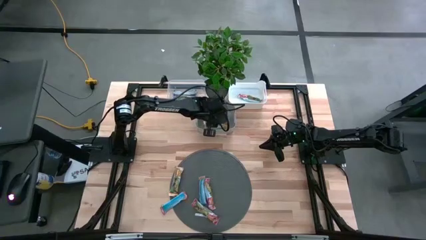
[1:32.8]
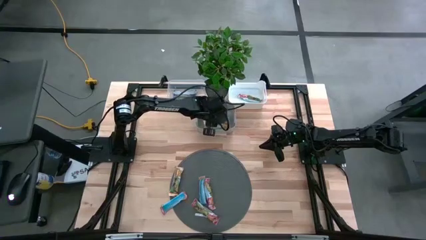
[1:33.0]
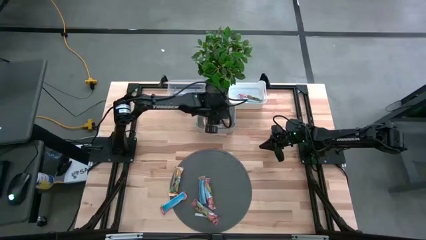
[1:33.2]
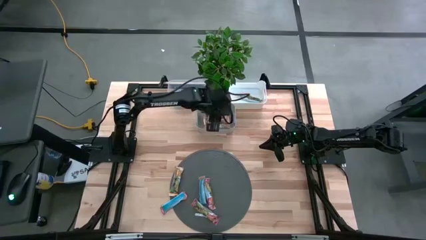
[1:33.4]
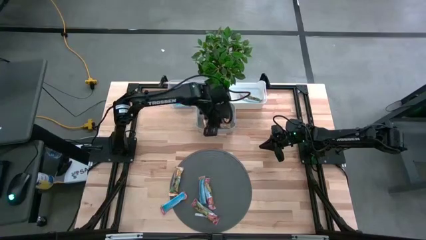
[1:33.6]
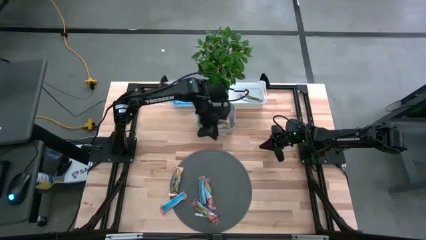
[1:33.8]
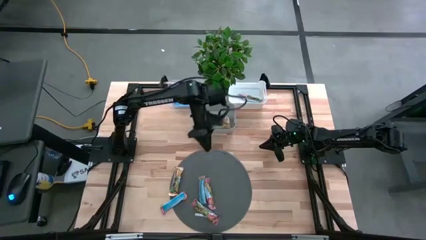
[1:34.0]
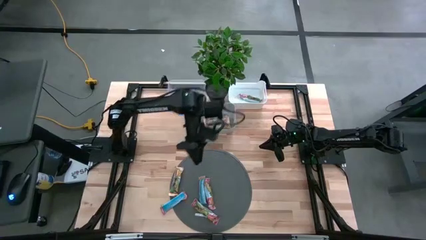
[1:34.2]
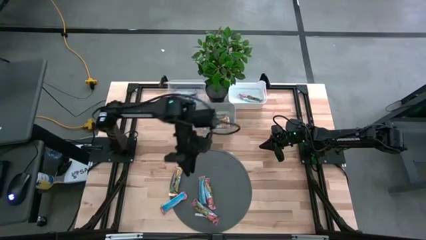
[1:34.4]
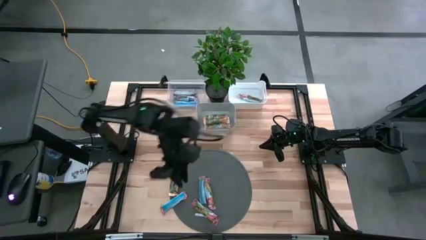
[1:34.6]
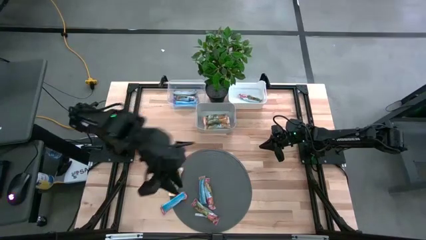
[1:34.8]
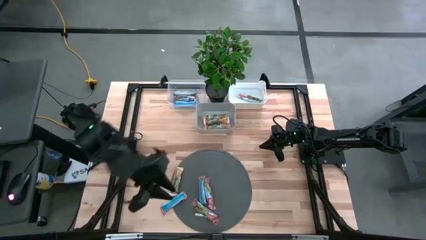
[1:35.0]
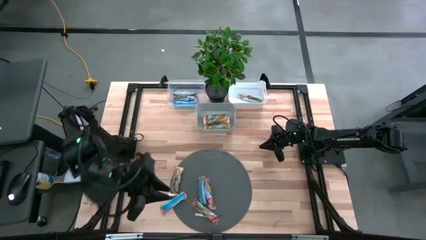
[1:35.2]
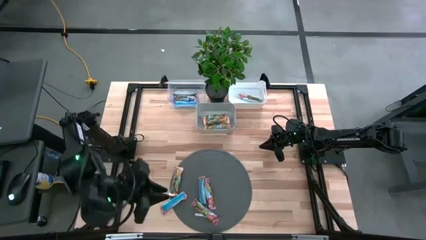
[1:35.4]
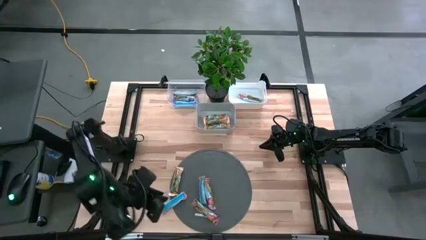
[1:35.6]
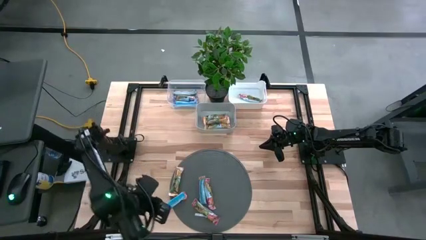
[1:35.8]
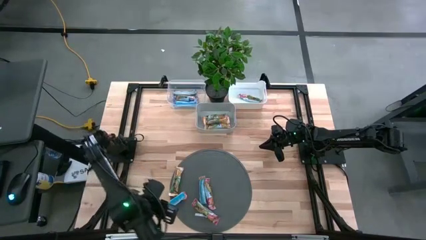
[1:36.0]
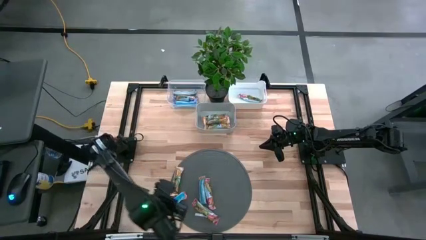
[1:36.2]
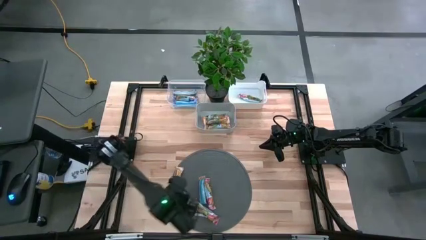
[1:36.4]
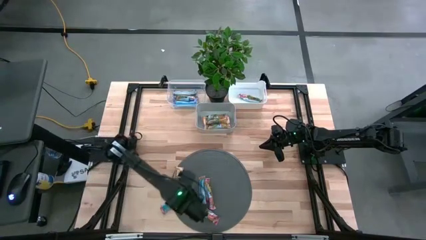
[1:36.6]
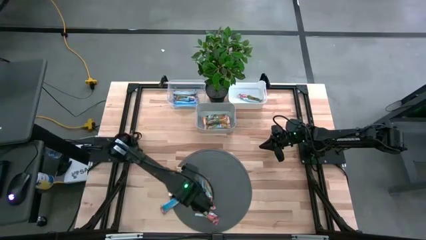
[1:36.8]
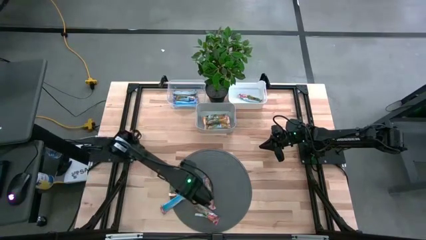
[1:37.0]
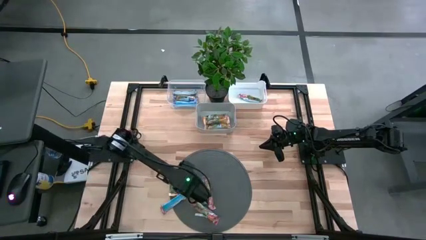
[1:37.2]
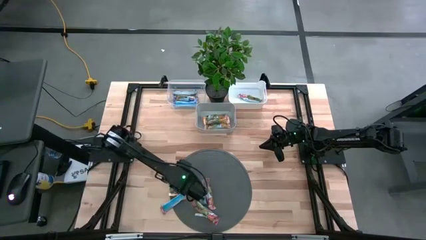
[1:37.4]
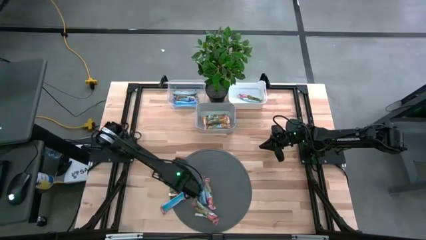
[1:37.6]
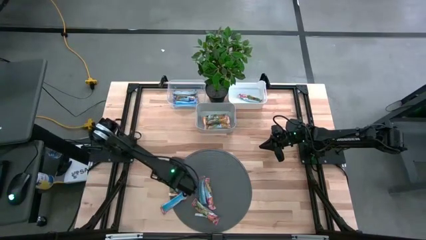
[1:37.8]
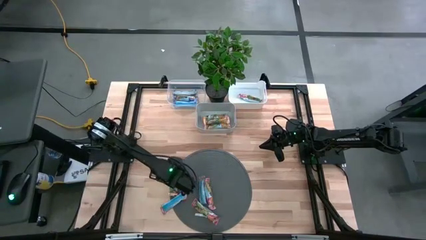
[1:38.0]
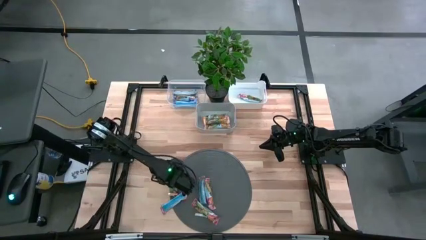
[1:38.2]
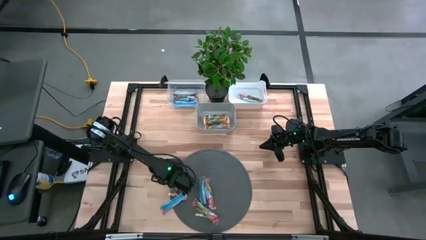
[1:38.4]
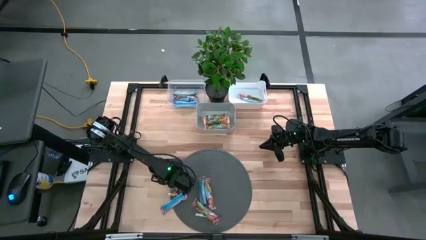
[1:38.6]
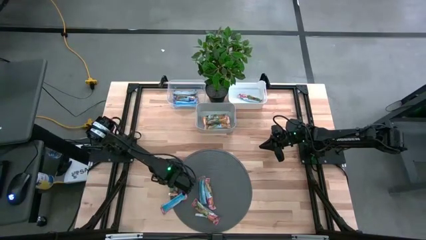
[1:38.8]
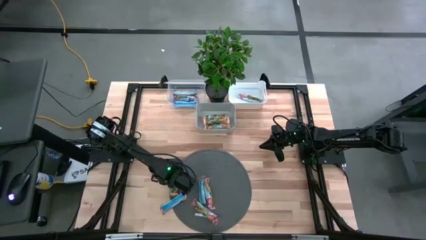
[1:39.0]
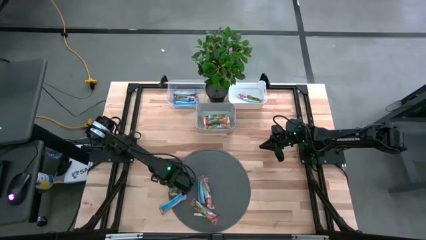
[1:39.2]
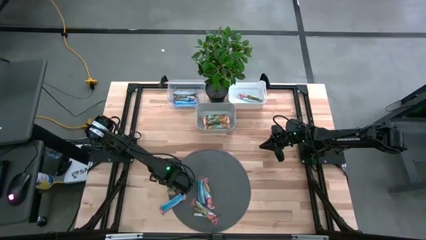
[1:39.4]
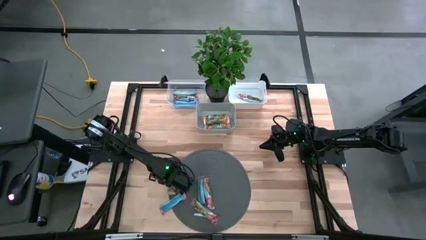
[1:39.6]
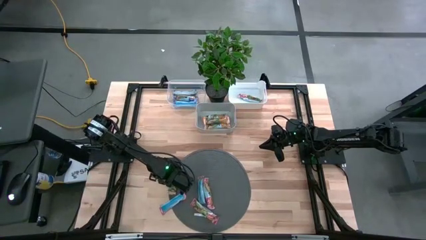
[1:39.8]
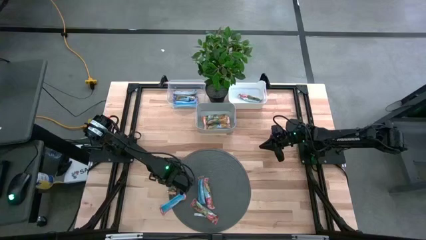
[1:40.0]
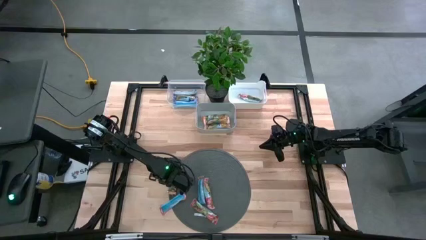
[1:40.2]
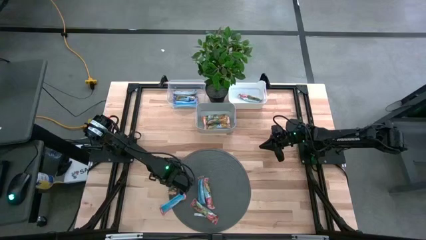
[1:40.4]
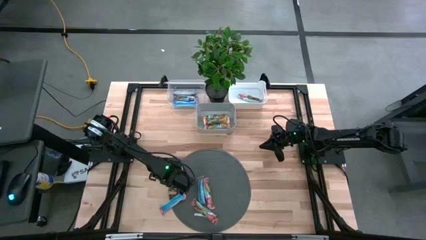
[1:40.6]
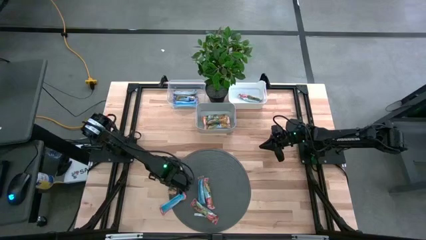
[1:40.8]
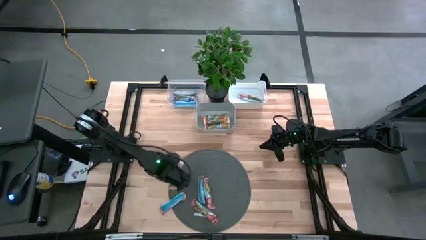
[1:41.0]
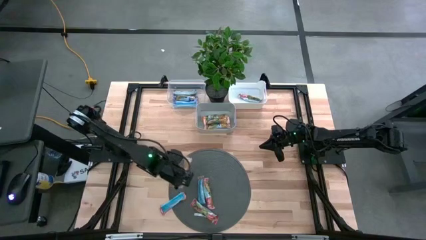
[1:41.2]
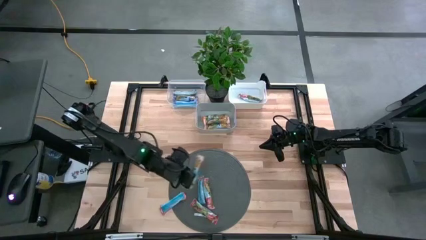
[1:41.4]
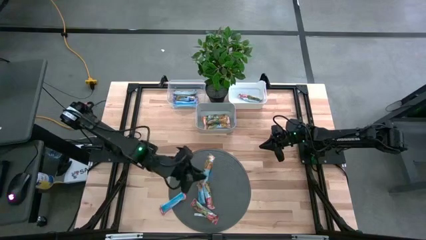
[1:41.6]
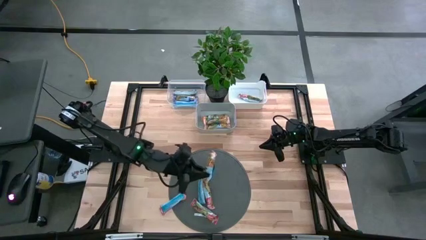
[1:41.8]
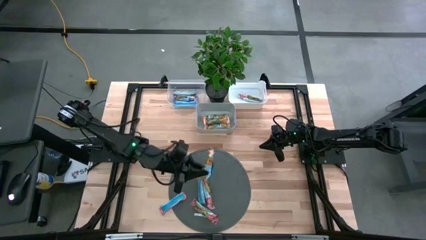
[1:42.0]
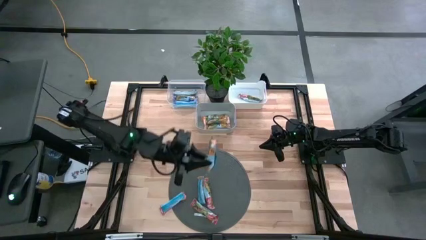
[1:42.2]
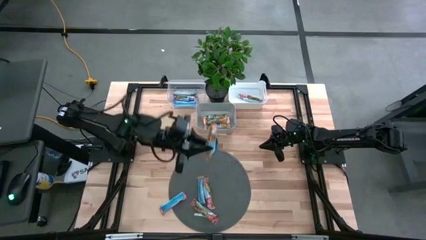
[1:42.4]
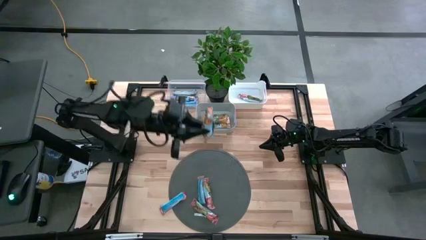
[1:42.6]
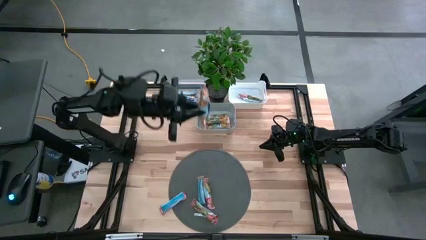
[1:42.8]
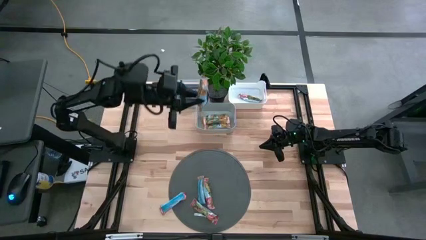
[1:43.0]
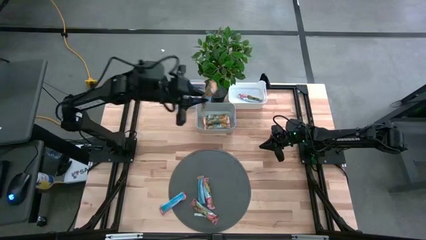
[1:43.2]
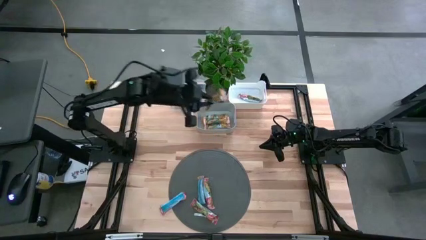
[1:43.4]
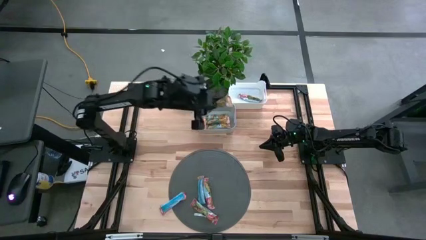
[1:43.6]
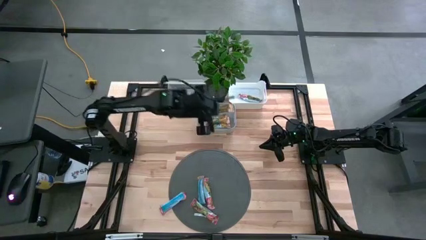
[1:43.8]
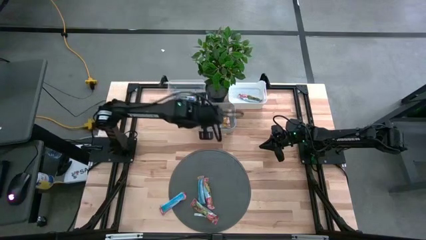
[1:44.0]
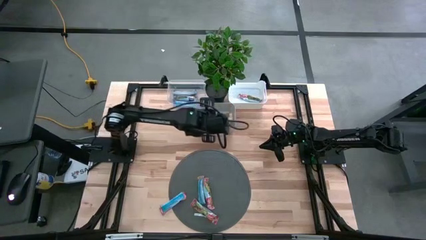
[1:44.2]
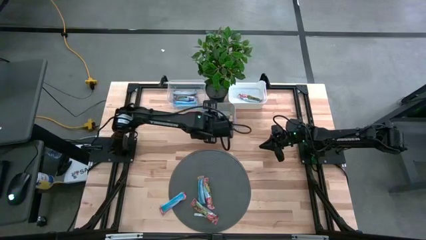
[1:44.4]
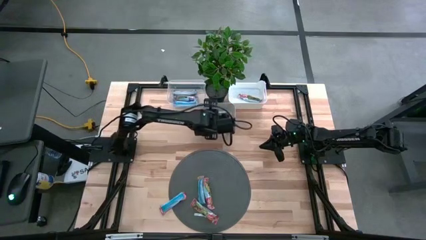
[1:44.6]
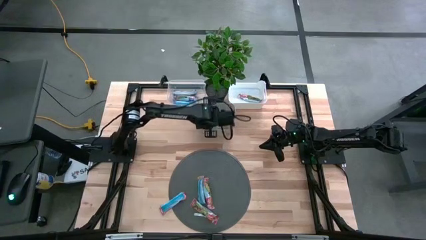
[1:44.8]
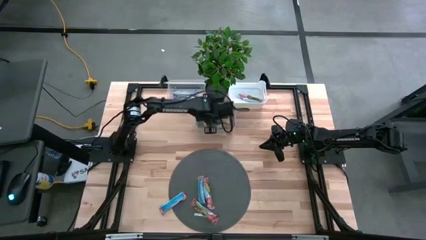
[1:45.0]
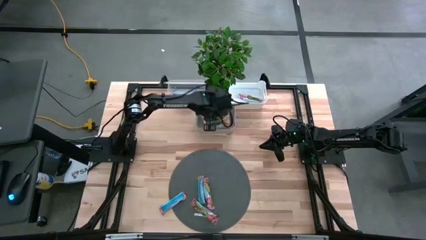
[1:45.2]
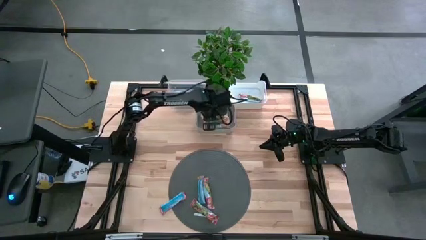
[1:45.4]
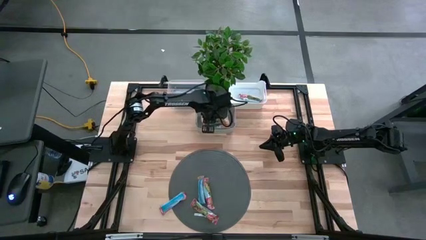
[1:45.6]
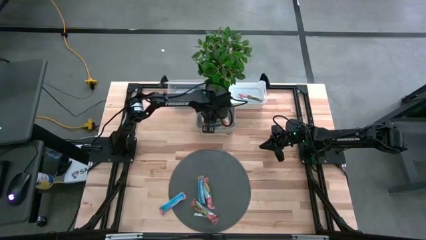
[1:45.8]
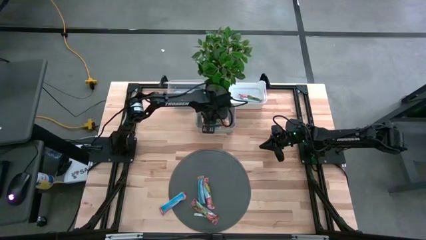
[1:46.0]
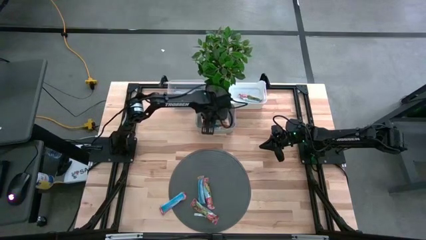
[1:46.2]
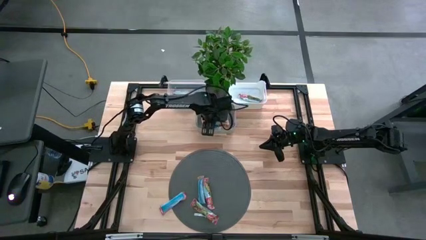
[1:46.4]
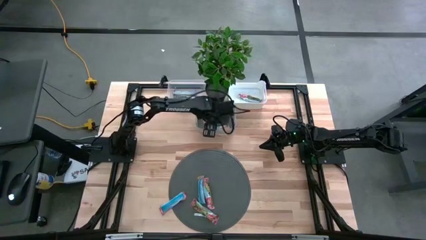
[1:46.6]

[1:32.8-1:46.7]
Task: Pick and place Granola Bars by type
Put the orange granola bar into the gray bin
